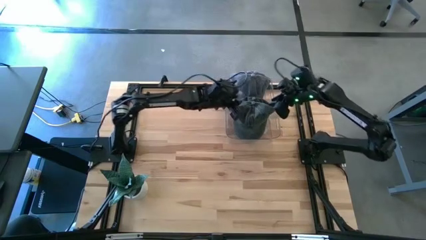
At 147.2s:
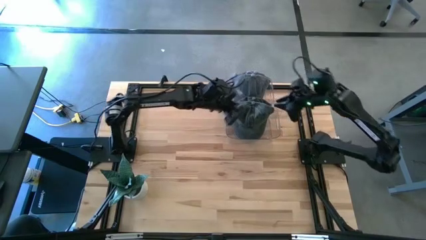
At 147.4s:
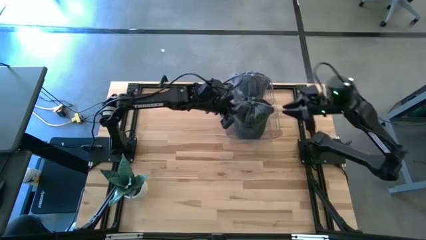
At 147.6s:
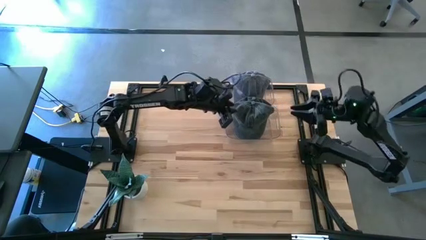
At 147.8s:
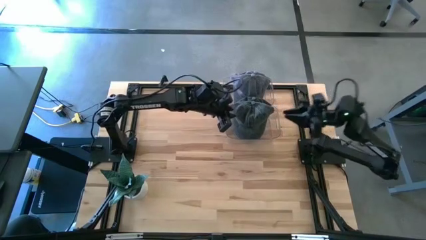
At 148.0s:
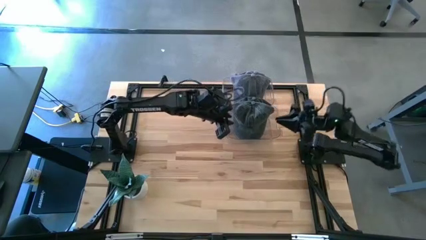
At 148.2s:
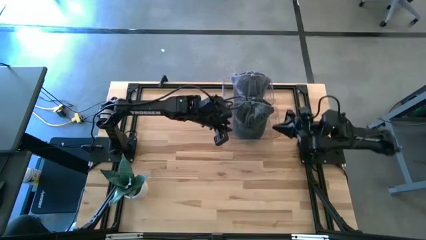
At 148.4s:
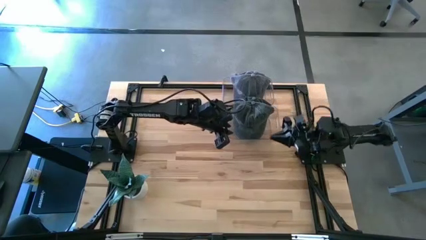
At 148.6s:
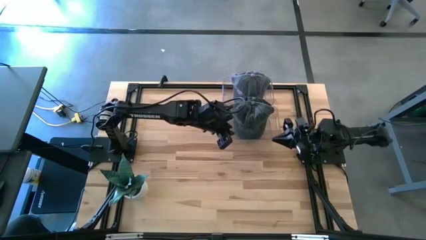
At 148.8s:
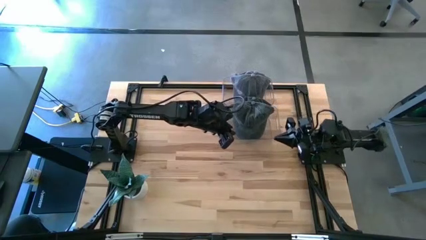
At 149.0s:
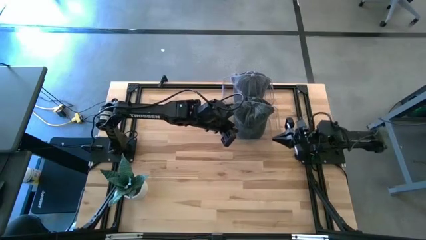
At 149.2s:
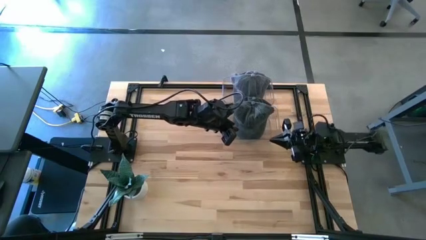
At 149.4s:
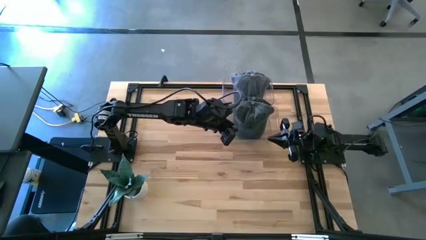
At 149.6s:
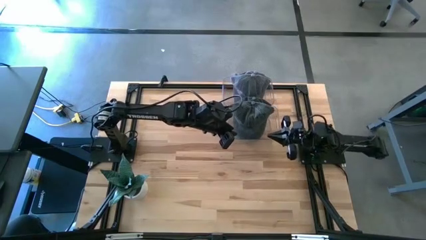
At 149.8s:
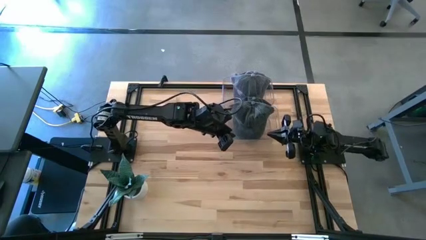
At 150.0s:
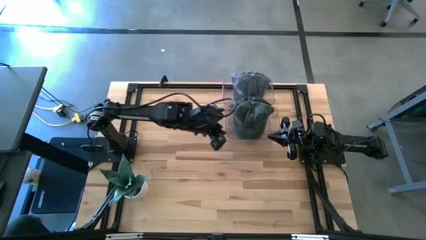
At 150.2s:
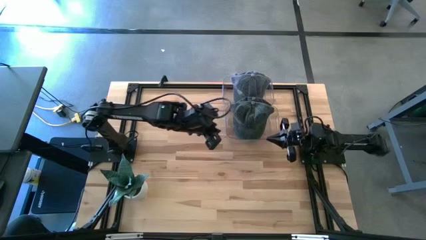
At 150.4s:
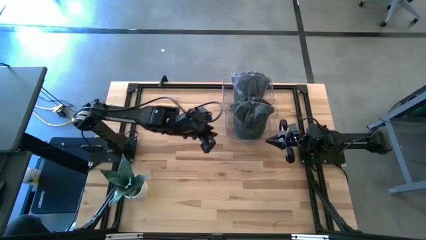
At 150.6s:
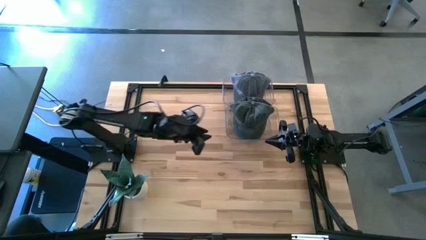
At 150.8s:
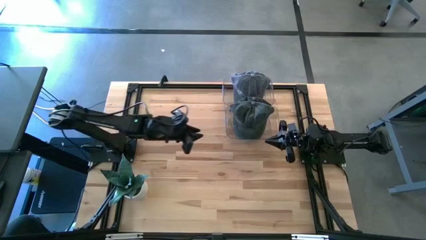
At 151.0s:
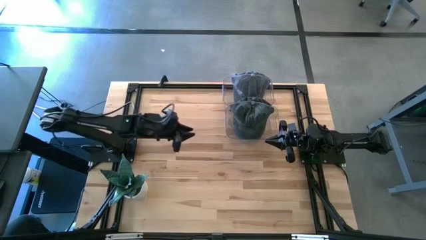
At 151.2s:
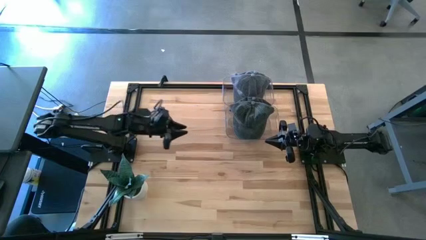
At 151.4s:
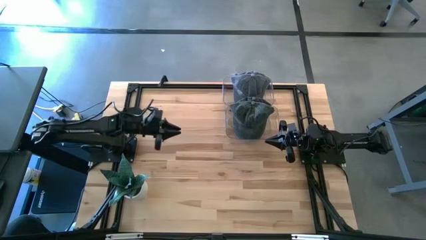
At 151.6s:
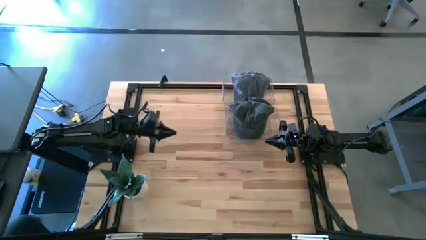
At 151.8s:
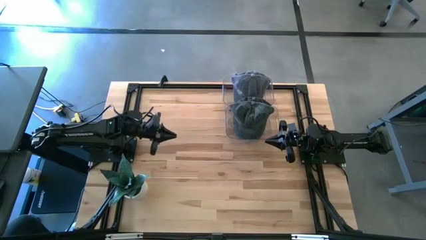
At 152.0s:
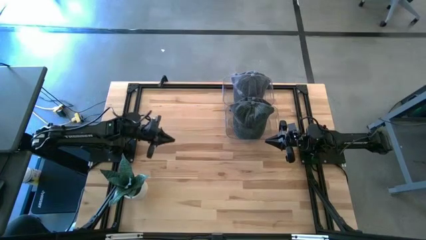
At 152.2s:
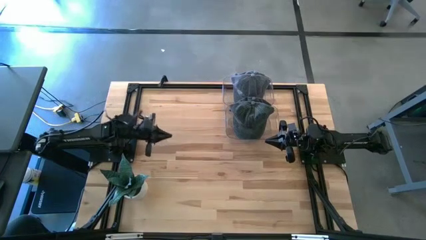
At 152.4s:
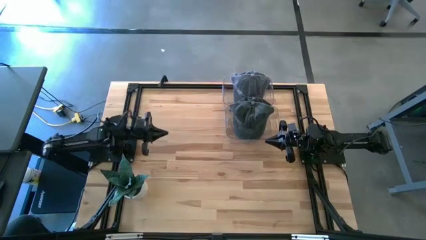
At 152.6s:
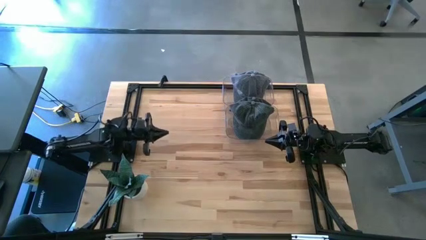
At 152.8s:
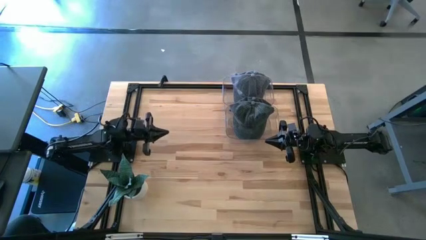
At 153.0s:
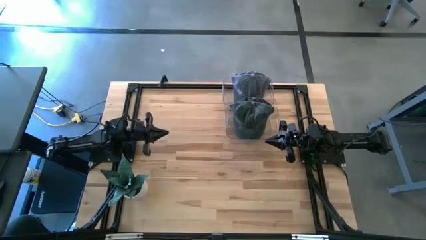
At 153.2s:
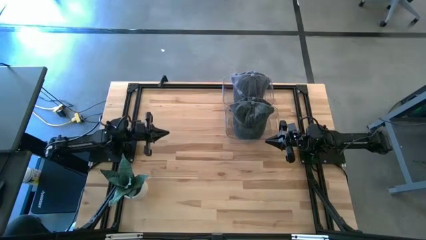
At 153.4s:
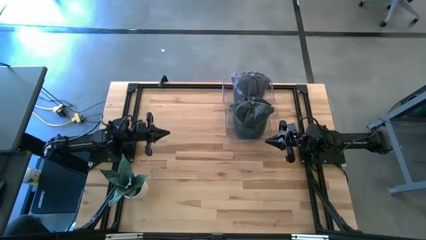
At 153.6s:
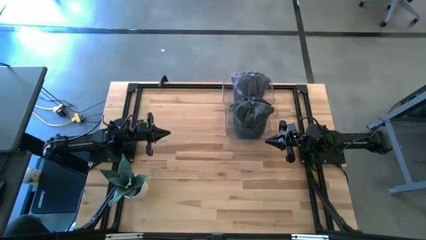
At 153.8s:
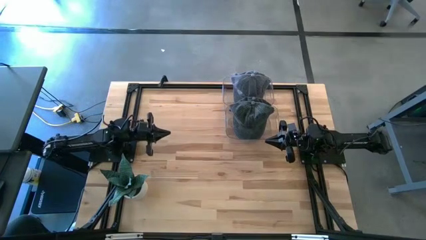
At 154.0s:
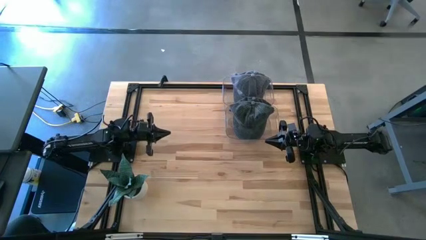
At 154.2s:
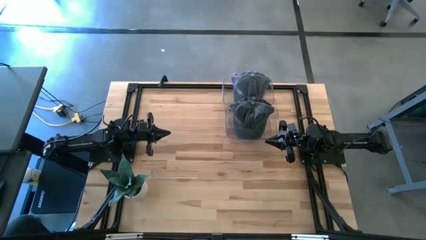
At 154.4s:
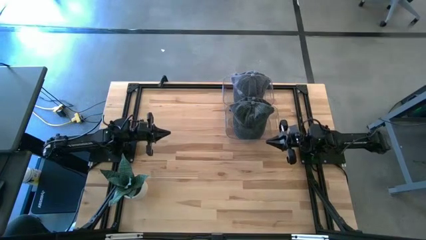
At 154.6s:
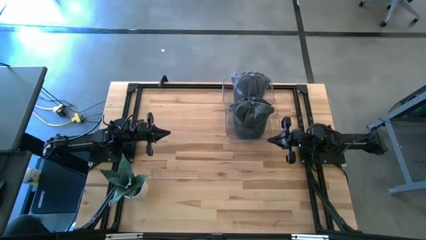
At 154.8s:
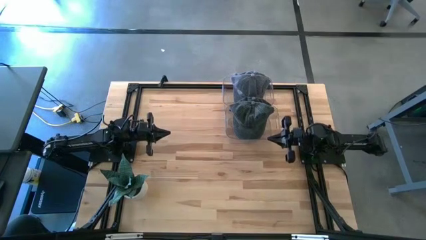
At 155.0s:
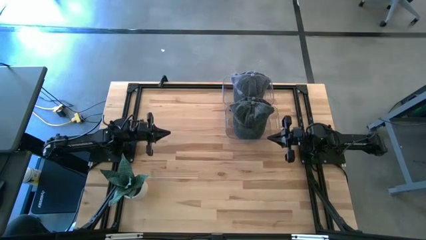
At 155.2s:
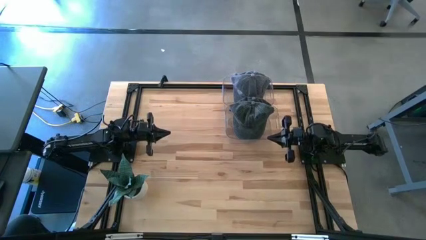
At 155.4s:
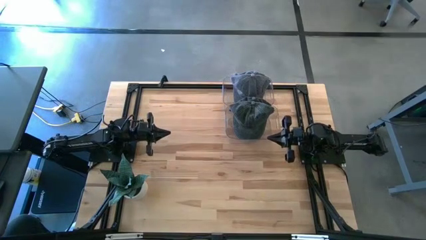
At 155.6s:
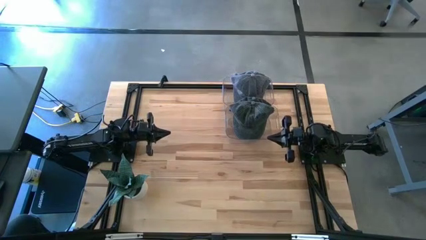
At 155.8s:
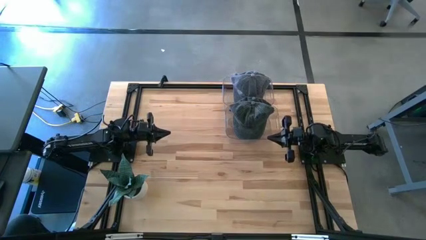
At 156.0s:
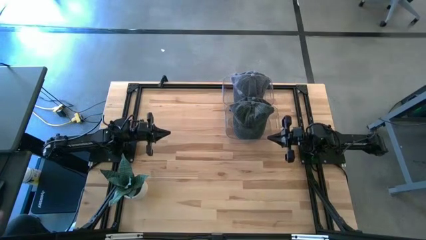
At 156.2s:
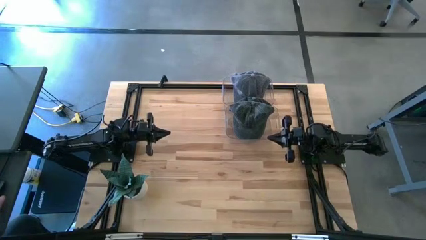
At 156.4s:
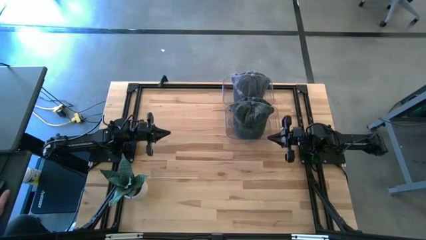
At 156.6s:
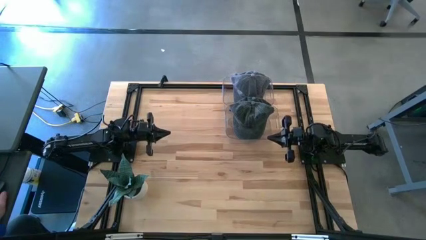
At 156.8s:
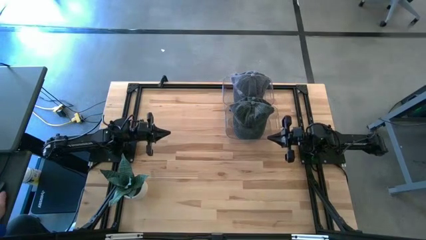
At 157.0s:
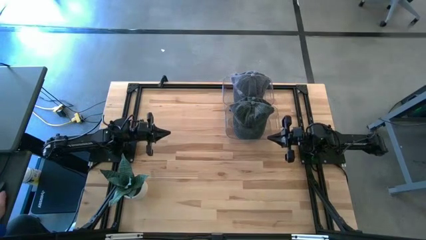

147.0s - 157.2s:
Task: Pick & Place hat
Return to Home Position

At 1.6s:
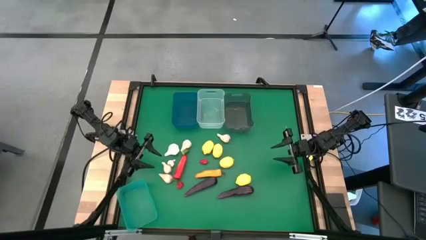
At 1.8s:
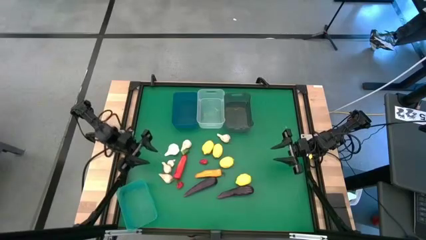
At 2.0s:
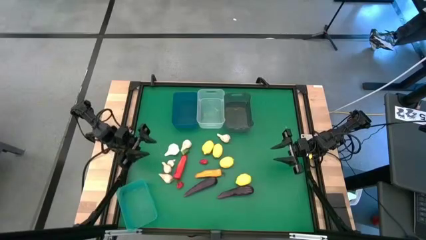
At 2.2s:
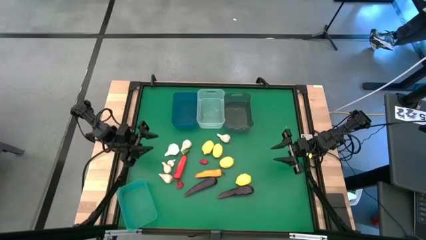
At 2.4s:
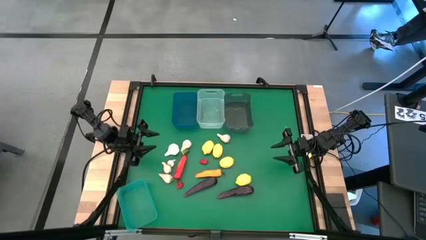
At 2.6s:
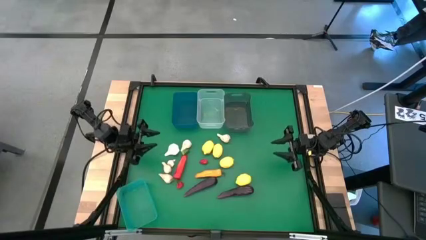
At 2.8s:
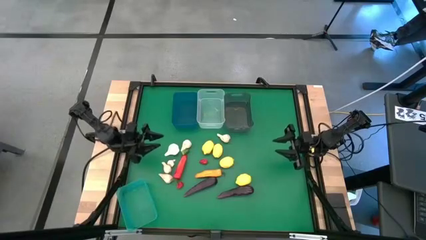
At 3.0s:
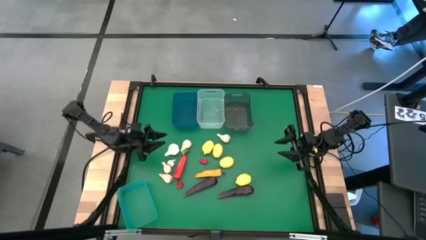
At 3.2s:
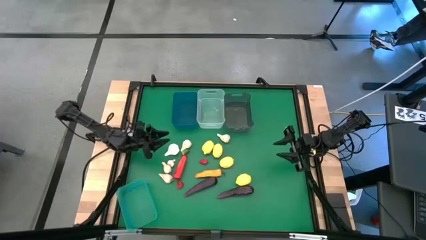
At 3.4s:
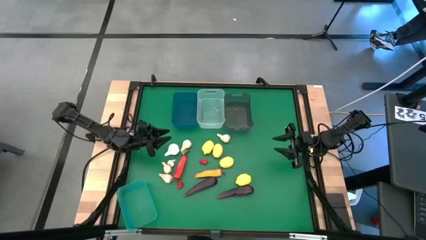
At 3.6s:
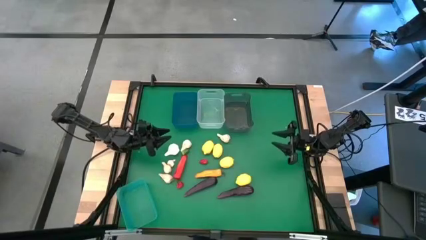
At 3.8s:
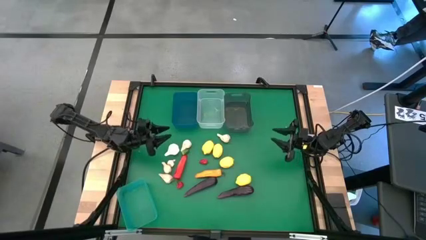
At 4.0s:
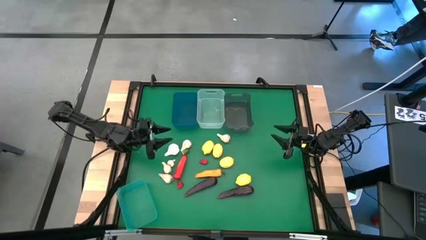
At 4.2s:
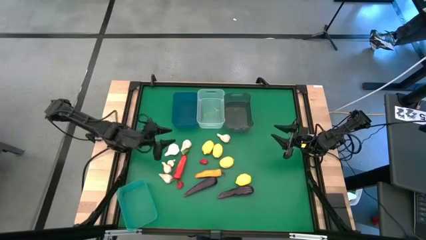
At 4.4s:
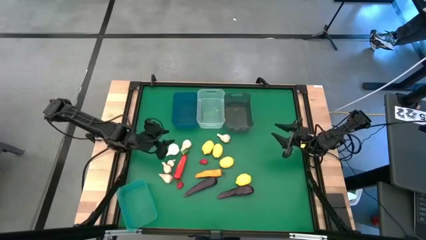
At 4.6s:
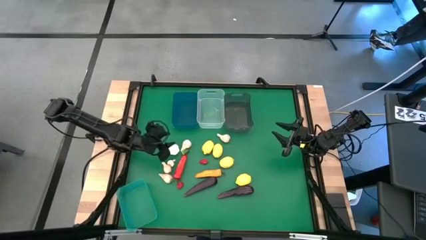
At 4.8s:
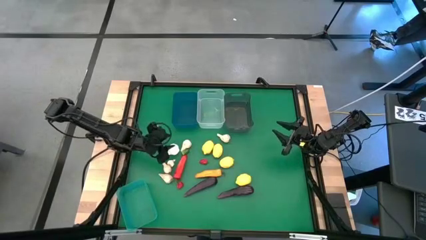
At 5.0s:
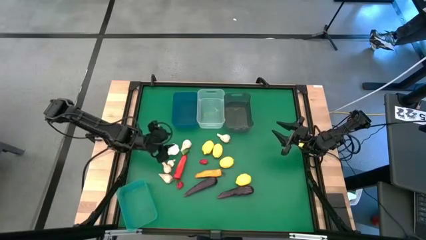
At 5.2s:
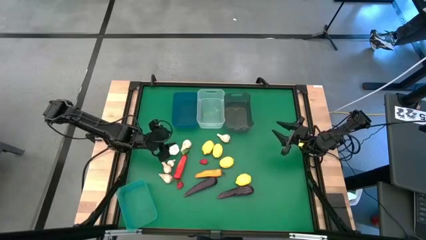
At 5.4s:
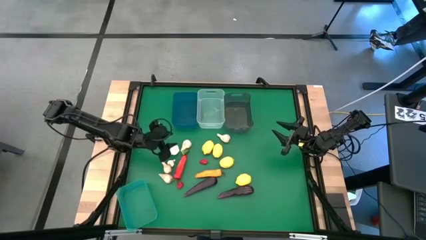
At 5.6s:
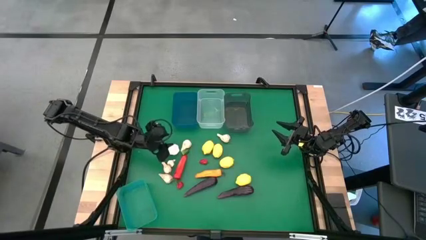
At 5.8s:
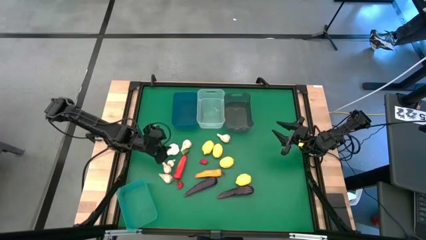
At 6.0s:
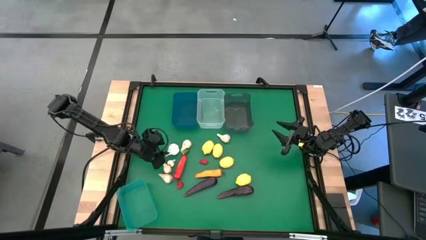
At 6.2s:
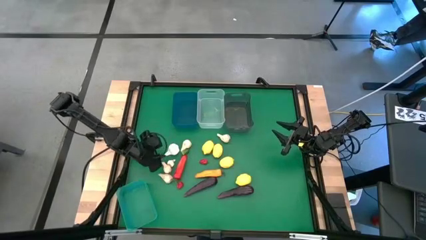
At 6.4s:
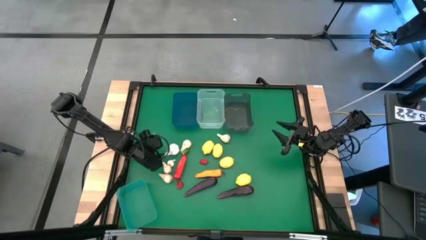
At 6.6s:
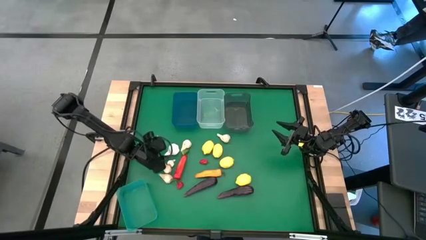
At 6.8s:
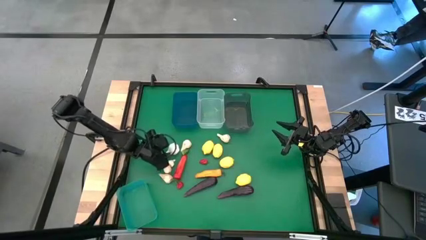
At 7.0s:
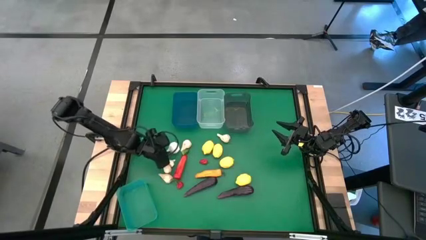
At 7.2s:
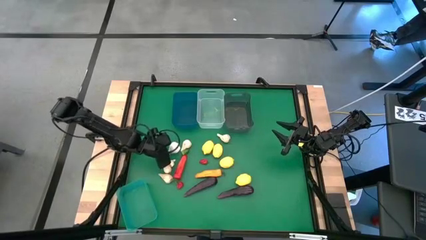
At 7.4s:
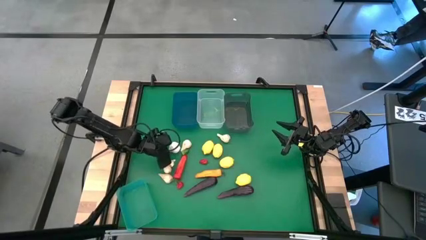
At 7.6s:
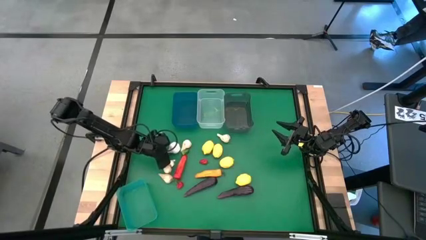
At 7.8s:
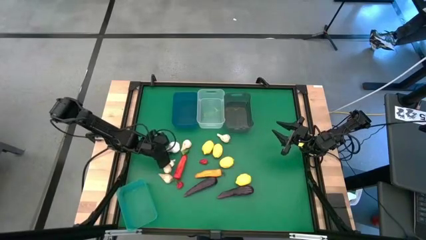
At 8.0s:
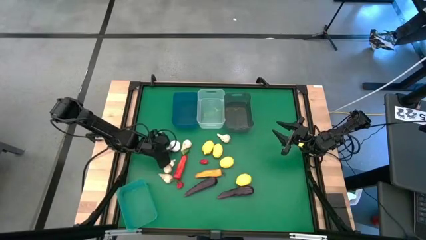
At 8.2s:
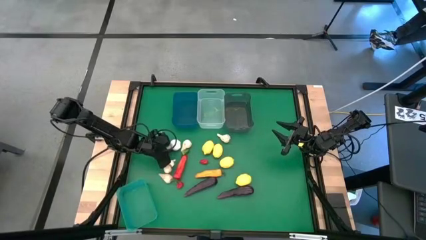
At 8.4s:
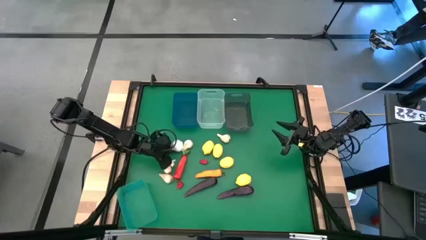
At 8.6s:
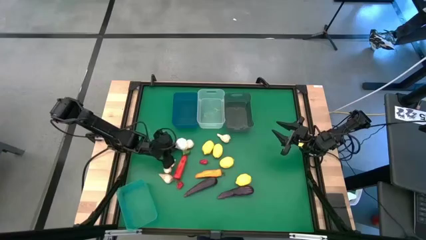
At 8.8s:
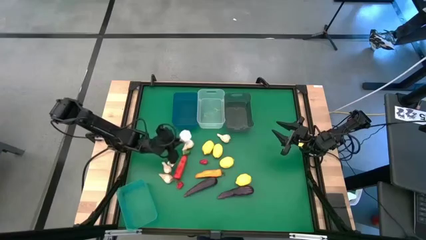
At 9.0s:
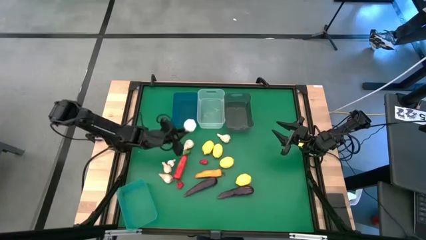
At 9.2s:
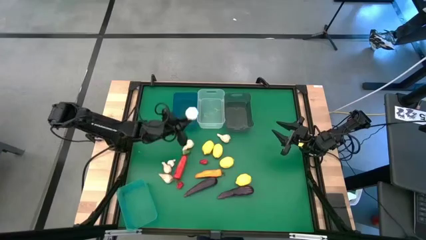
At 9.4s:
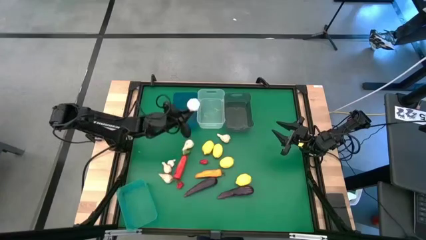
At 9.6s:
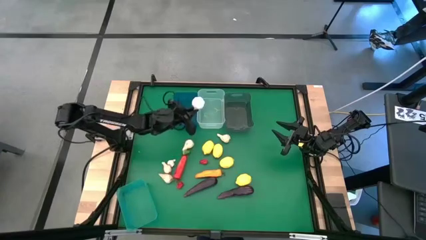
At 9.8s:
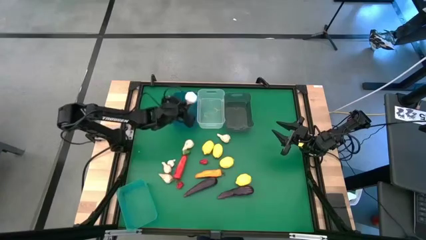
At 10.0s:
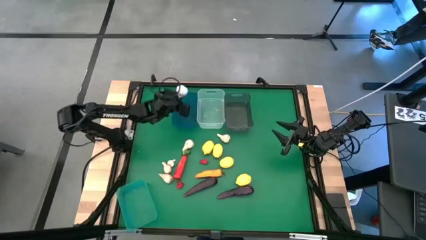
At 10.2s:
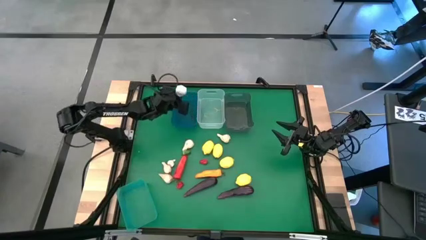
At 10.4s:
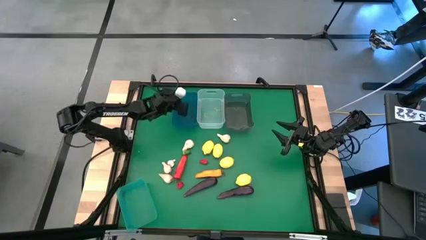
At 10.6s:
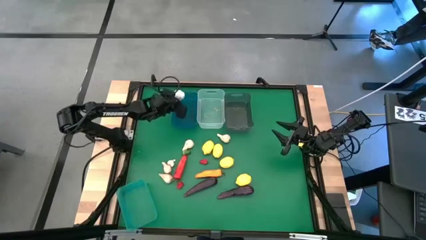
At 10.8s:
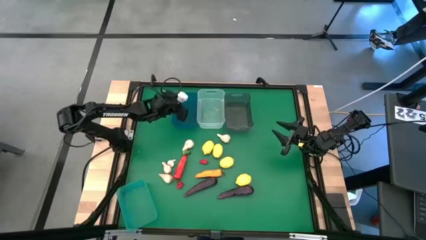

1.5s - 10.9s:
Task: Sort produce into baskets
Put the white garlic into the blue bin
